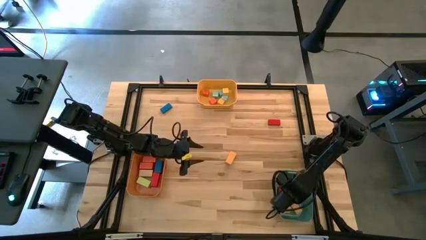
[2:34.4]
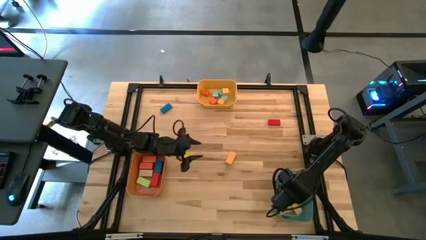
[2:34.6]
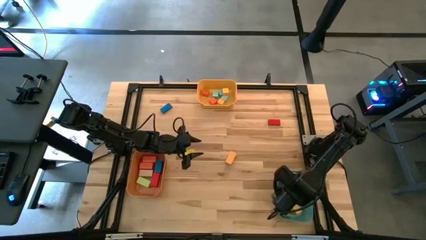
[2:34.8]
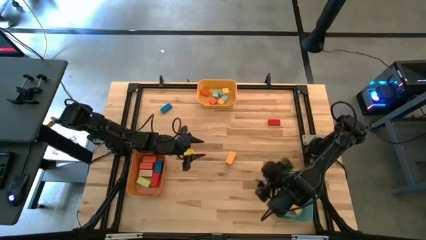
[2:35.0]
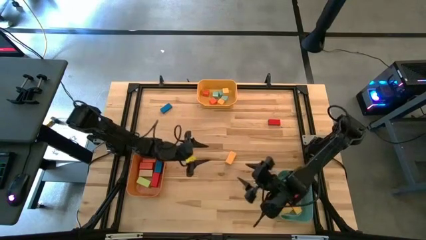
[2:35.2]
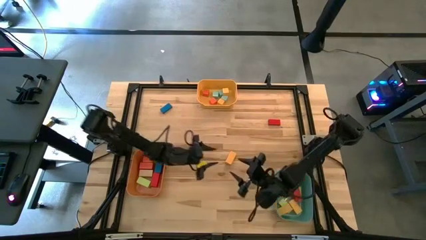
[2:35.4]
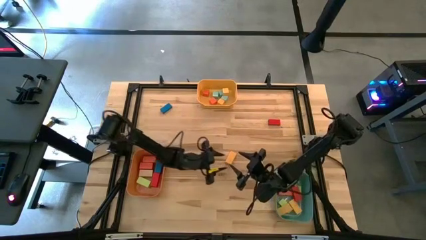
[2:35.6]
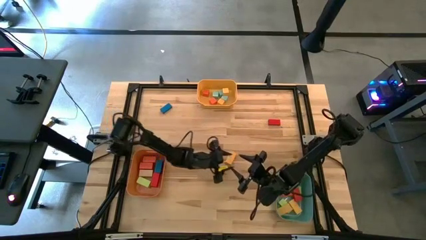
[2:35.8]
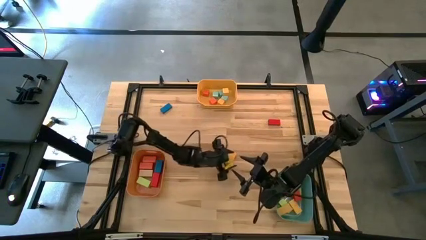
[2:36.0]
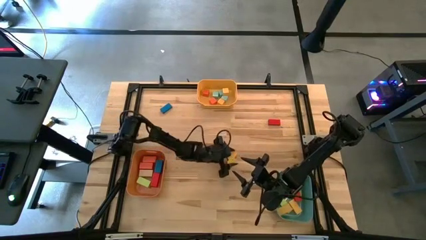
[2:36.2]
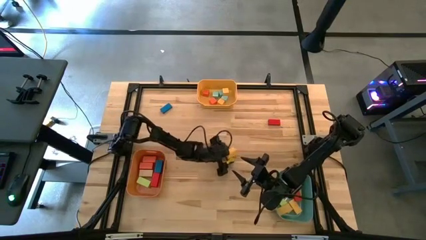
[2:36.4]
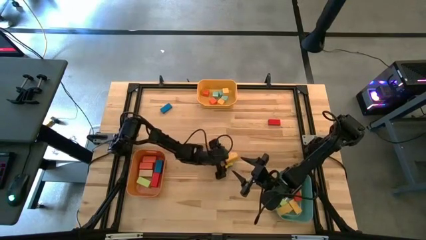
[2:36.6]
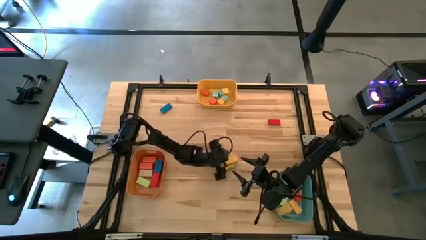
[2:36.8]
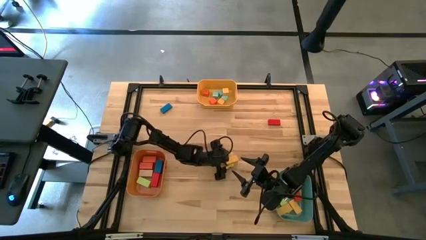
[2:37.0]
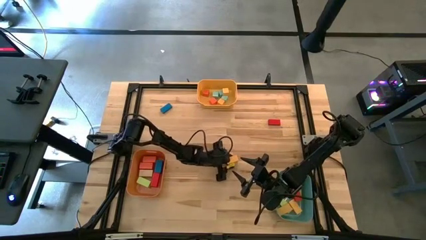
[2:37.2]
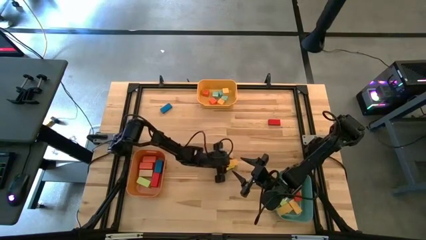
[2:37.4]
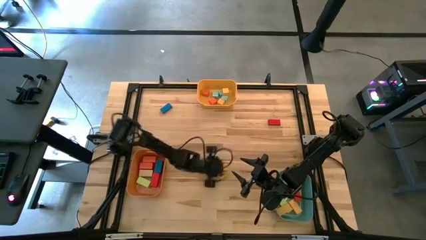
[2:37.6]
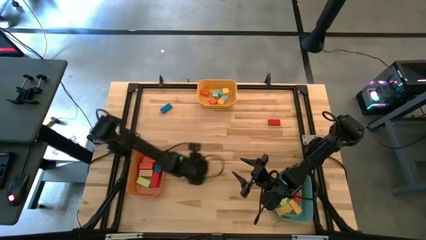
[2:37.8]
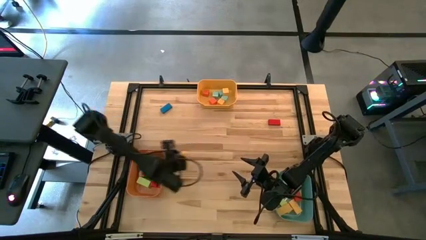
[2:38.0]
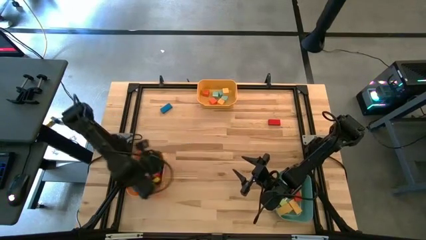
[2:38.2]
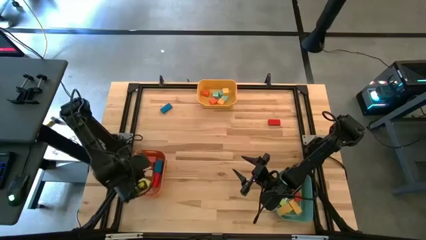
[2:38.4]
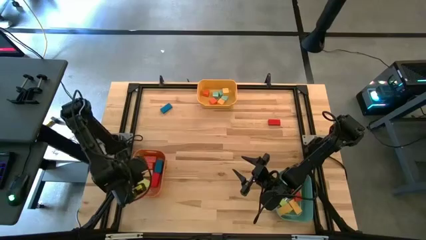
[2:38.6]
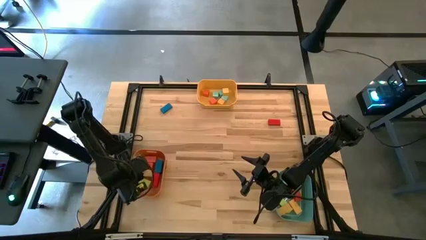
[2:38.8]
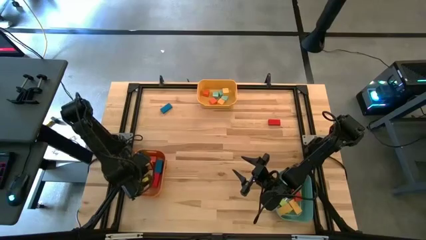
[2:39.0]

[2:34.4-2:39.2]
Task: Sort blocks by size
Put the thick yellow block into the orange bin

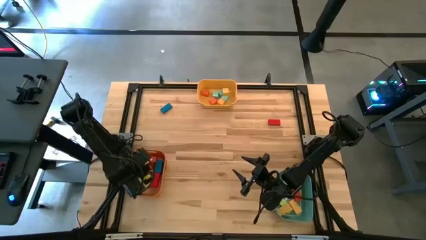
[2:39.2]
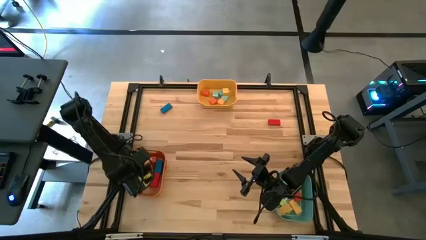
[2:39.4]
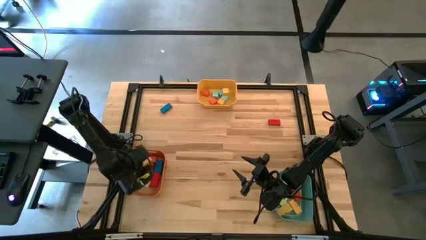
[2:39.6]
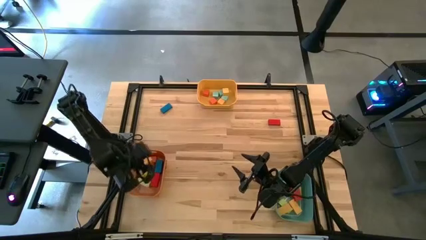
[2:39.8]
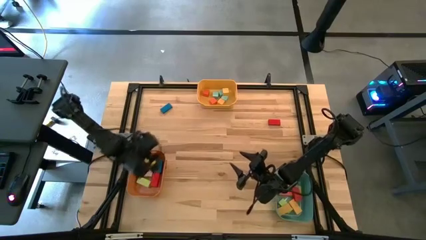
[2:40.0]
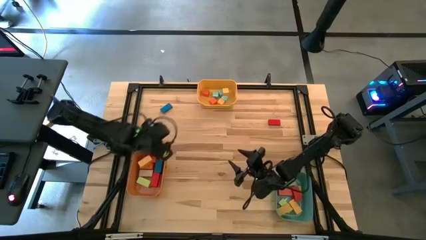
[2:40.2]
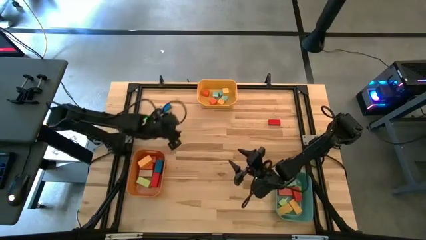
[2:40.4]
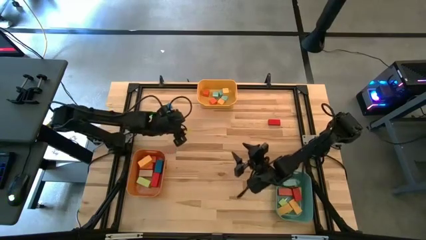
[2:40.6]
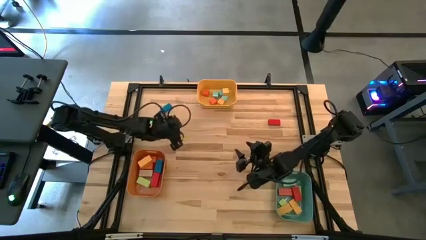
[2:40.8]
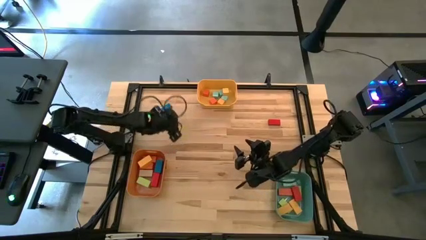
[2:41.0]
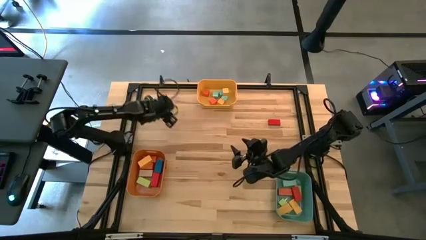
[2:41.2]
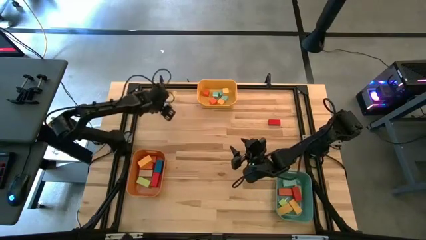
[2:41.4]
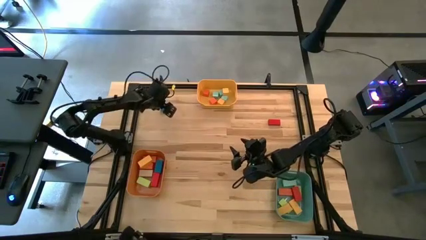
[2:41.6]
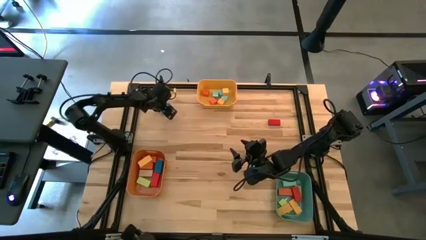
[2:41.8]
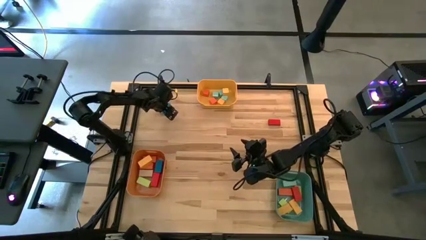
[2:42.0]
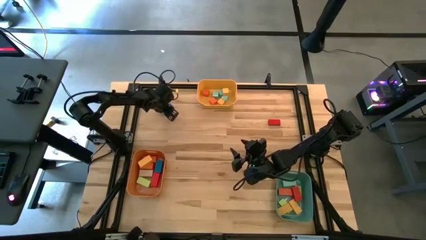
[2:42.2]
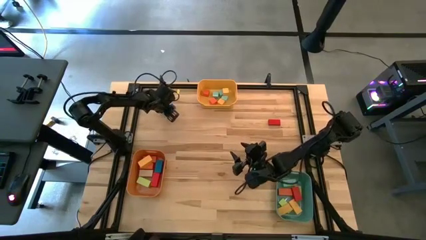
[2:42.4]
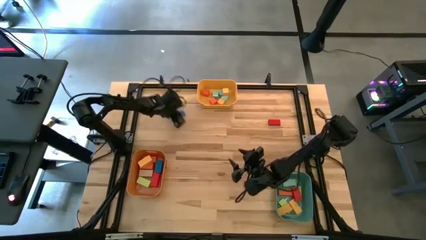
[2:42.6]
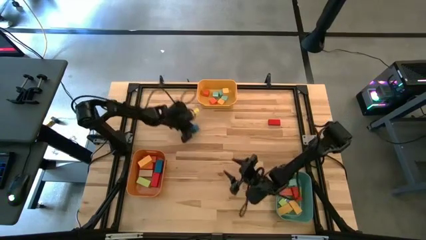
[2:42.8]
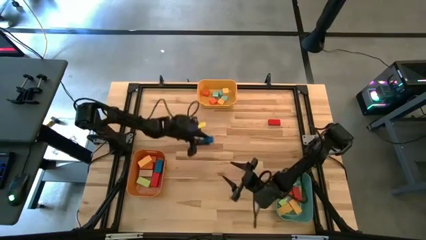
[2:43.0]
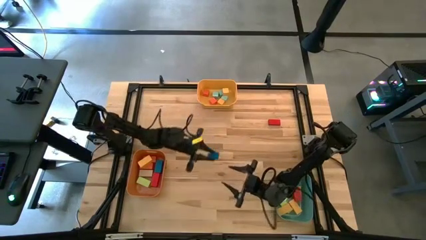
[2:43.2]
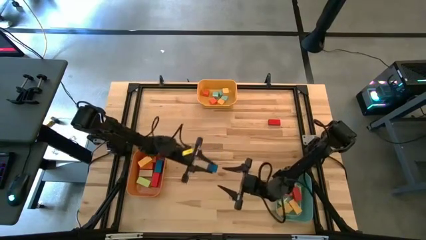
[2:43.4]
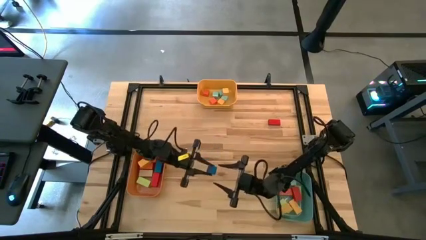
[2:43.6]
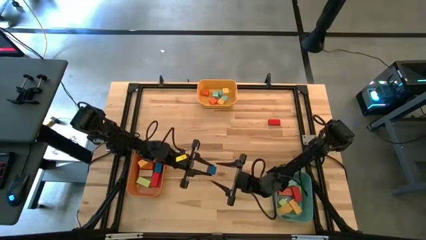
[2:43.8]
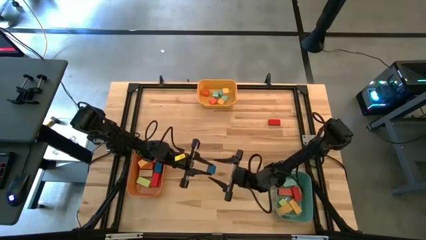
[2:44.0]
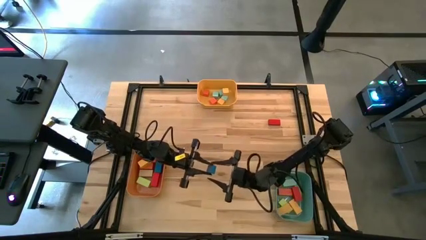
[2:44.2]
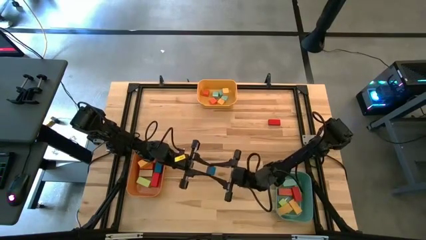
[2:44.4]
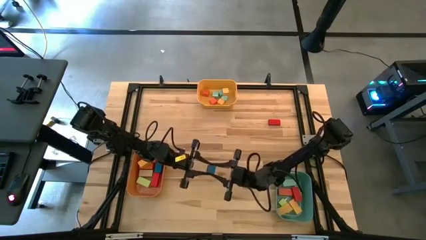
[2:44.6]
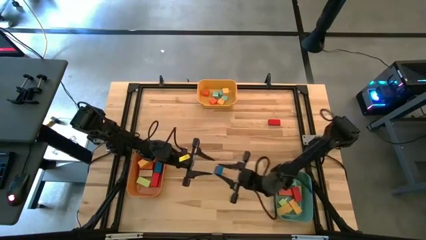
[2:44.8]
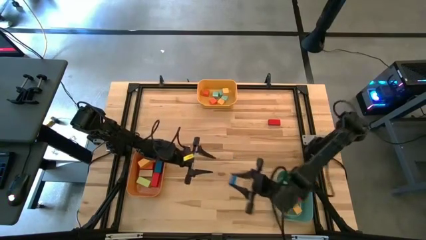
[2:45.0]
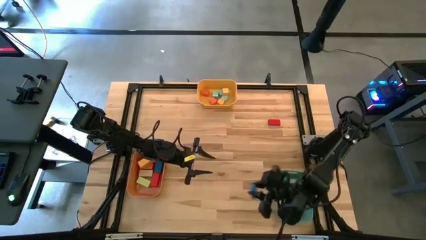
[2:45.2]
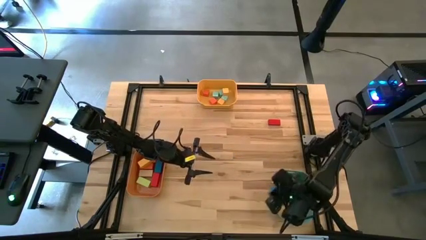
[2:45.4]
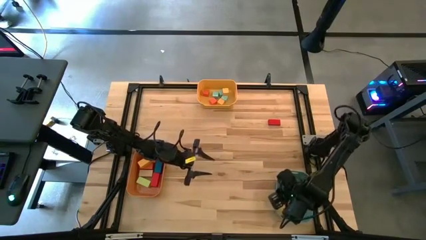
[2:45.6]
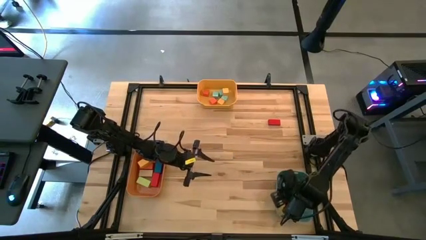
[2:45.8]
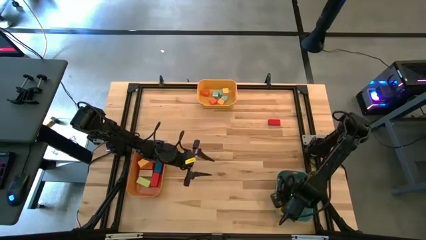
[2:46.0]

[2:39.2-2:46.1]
Put the thin blue block into the green bin

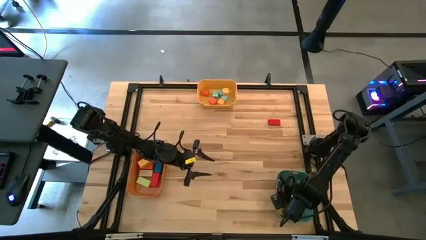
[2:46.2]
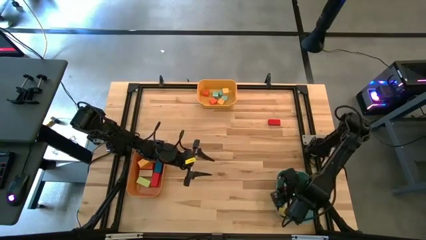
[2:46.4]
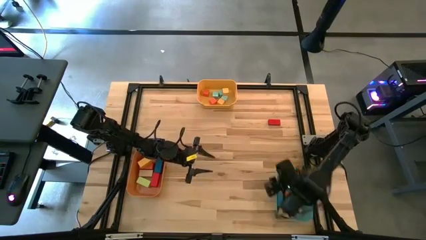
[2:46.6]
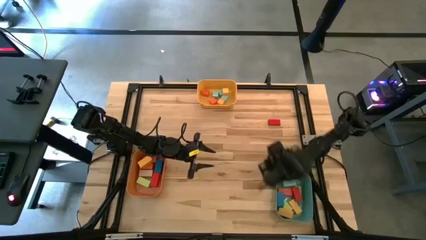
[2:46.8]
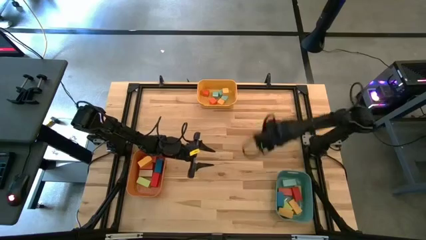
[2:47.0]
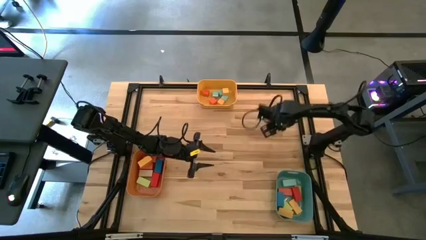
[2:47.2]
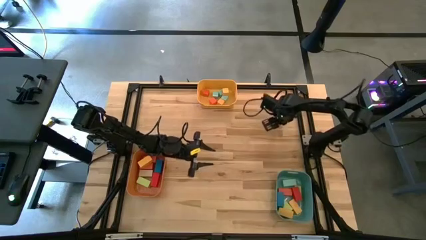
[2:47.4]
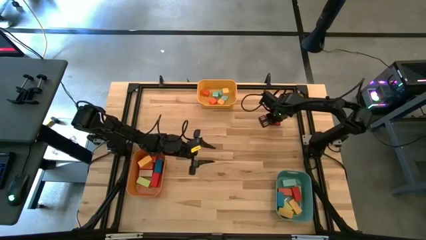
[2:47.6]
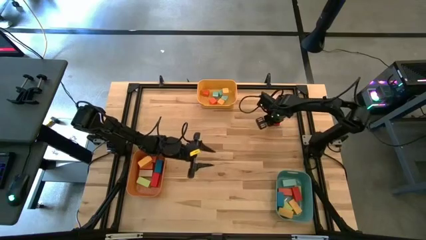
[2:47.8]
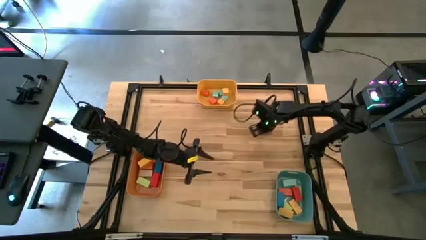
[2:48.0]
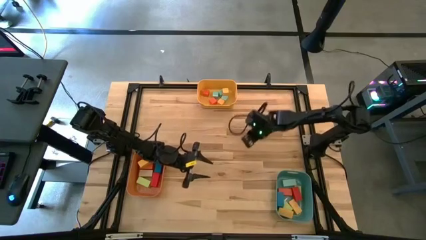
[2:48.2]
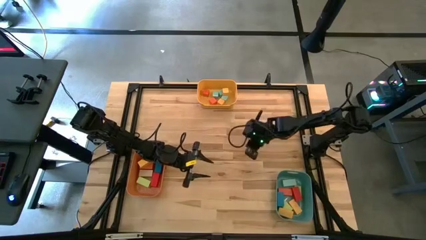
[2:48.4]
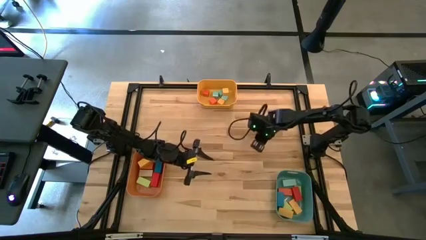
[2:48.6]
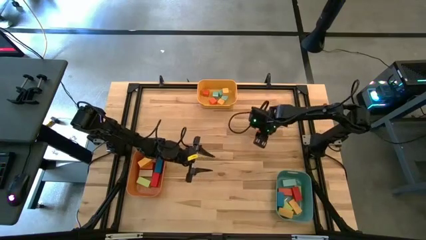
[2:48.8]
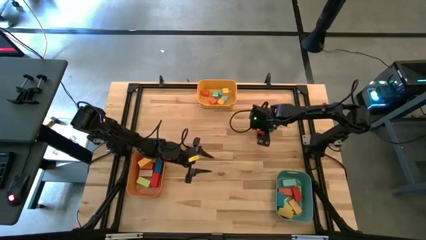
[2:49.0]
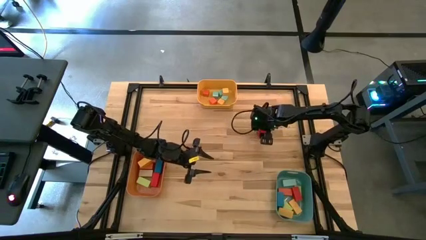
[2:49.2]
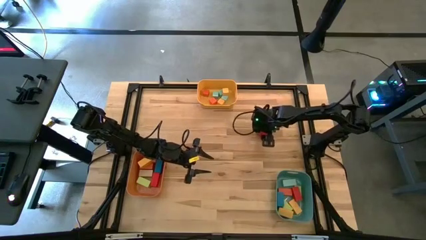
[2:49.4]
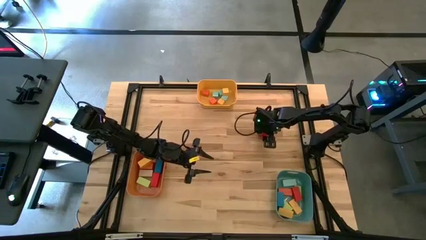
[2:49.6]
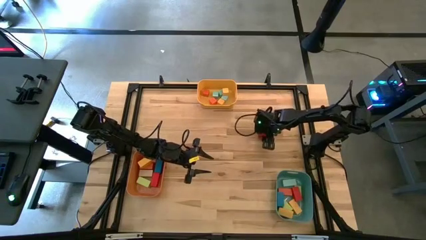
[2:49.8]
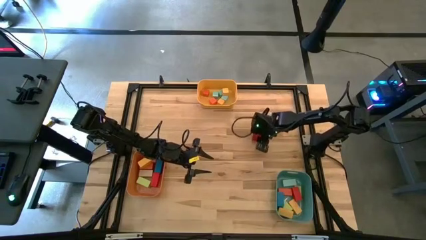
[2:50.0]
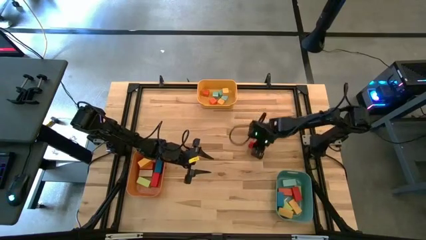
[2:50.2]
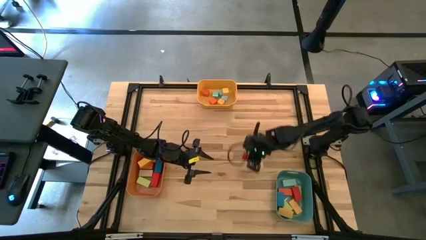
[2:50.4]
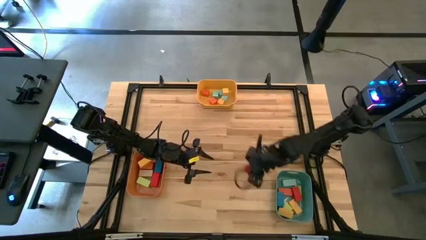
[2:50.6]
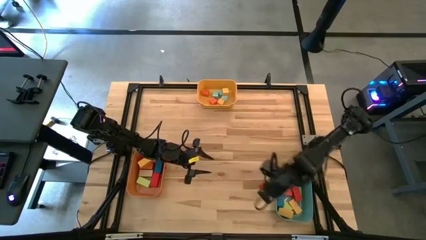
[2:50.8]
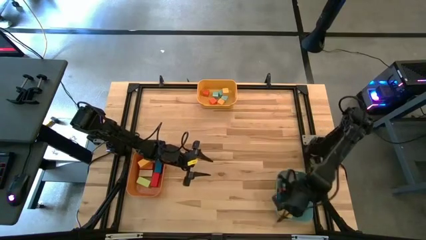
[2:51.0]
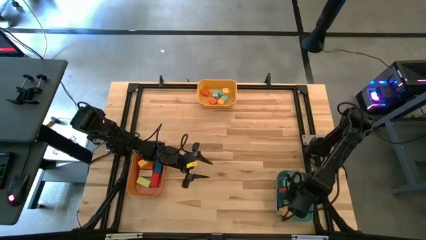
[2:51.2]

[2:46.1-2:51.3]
Put the thin red block into the green bin
